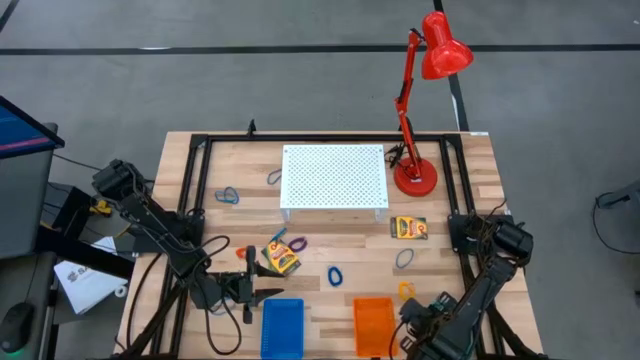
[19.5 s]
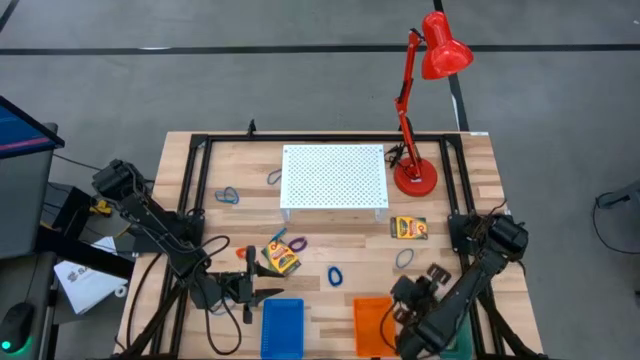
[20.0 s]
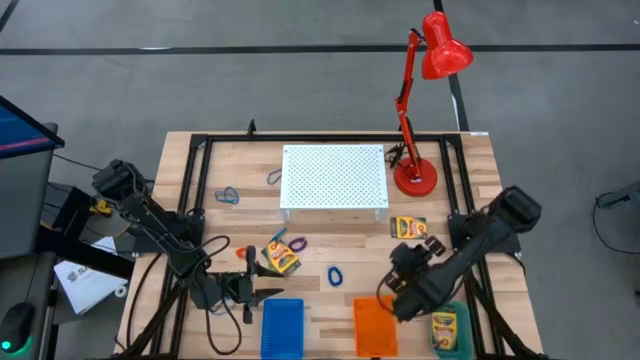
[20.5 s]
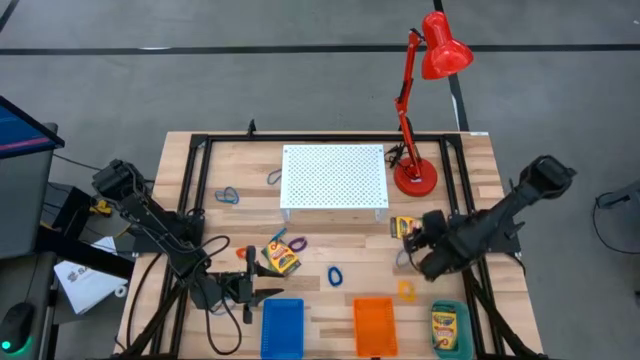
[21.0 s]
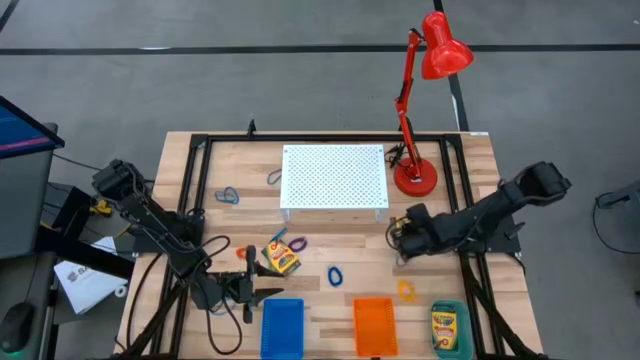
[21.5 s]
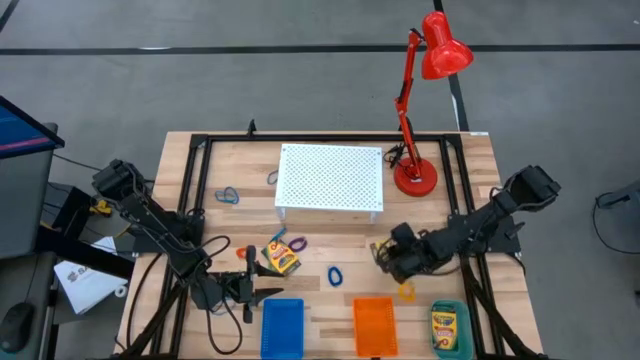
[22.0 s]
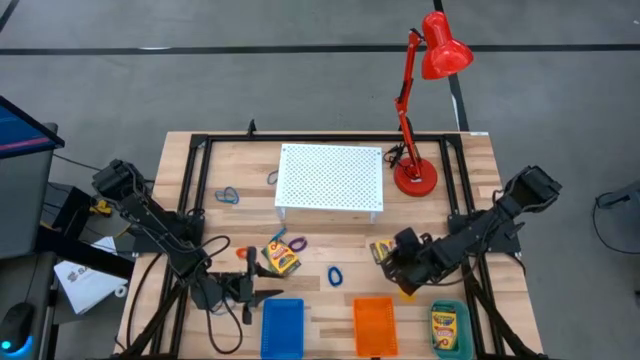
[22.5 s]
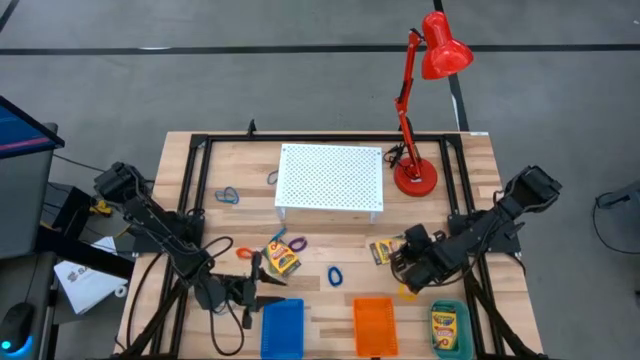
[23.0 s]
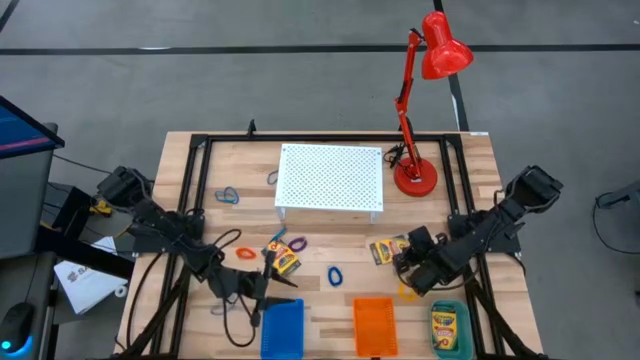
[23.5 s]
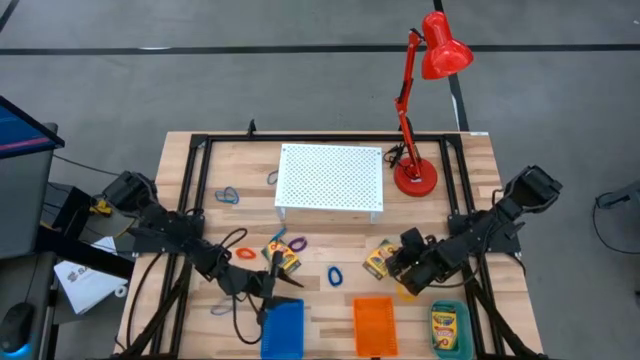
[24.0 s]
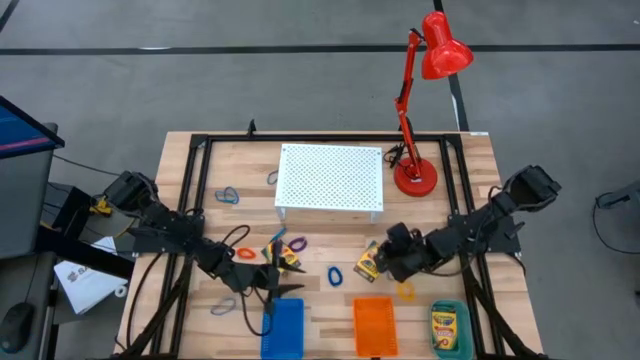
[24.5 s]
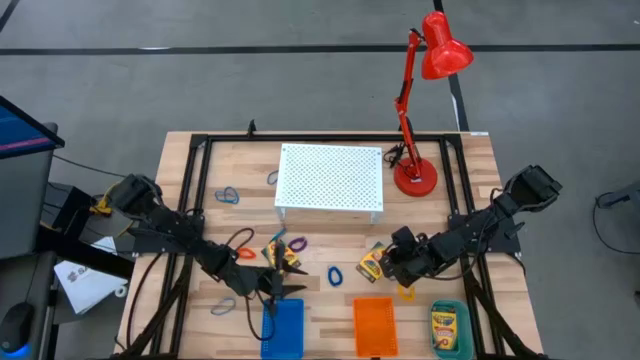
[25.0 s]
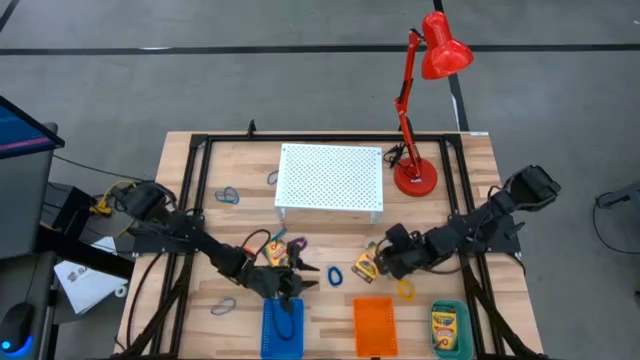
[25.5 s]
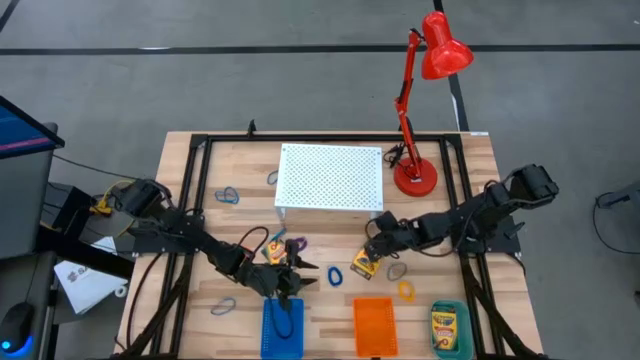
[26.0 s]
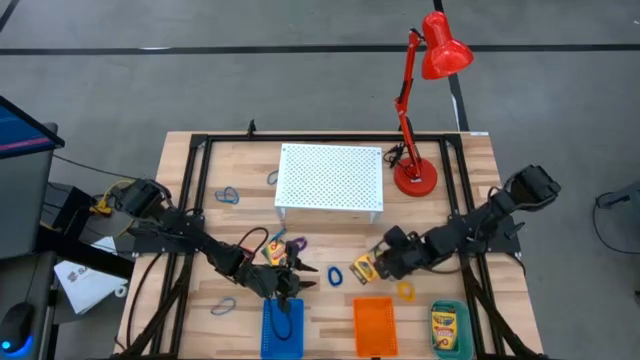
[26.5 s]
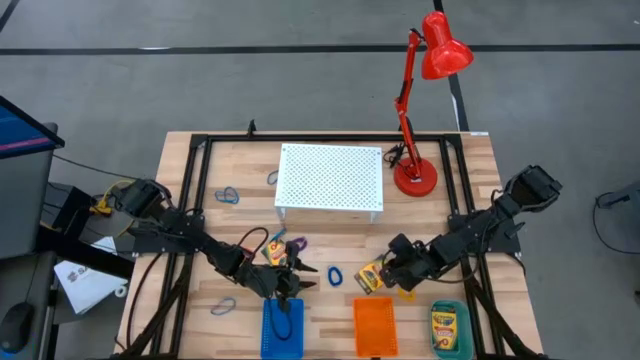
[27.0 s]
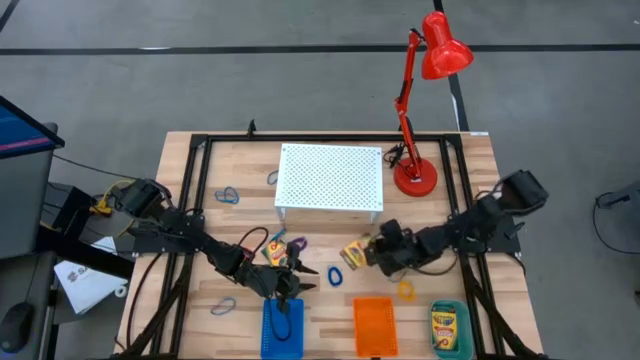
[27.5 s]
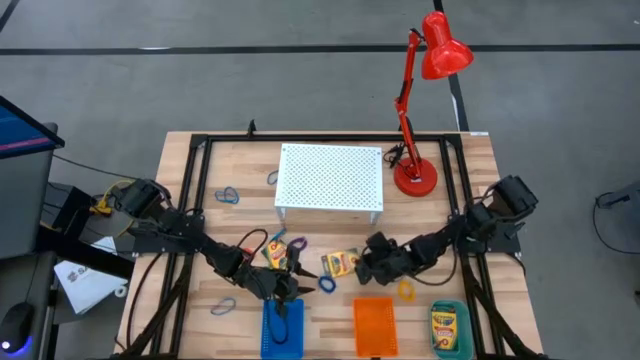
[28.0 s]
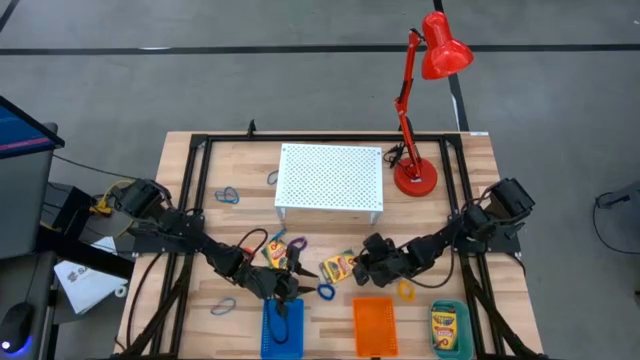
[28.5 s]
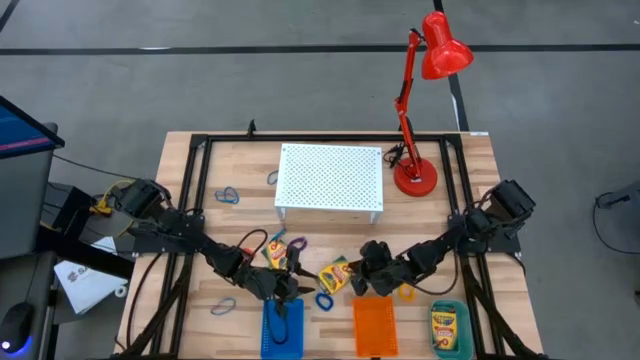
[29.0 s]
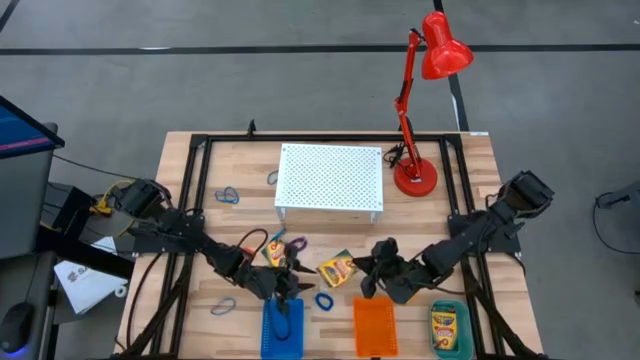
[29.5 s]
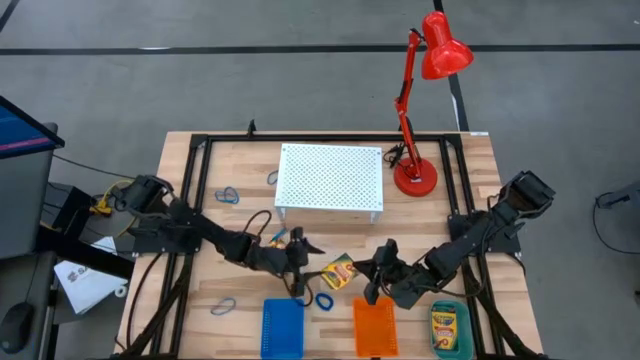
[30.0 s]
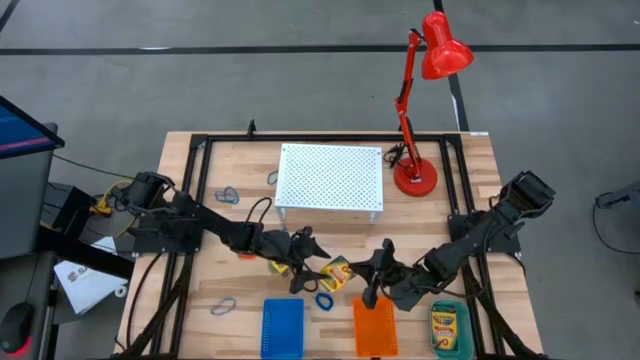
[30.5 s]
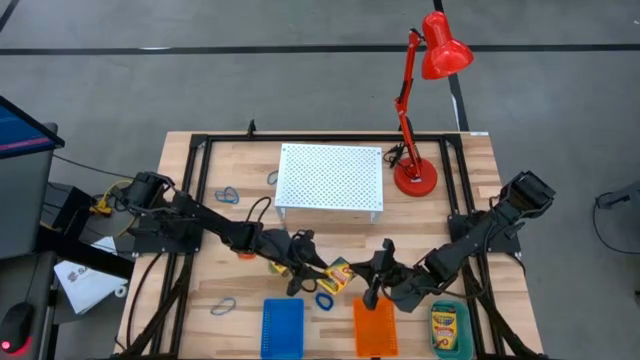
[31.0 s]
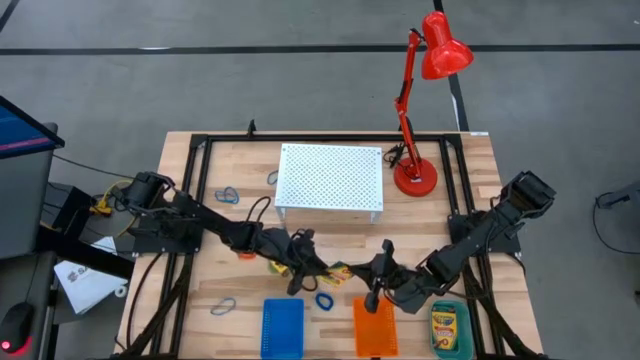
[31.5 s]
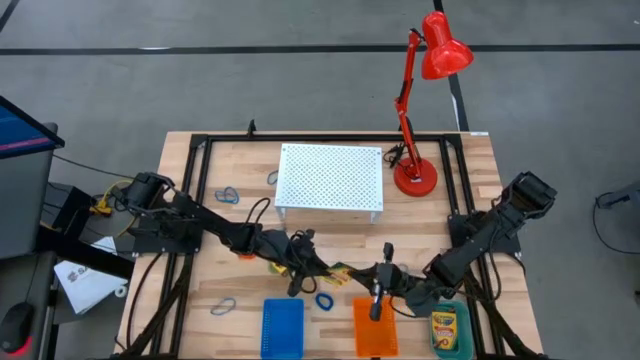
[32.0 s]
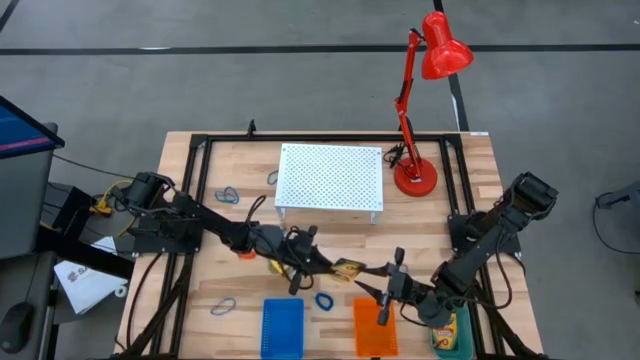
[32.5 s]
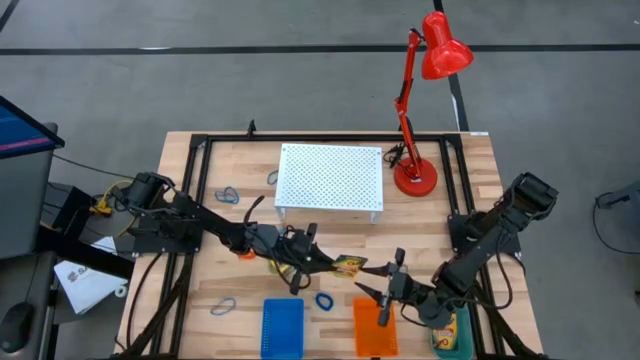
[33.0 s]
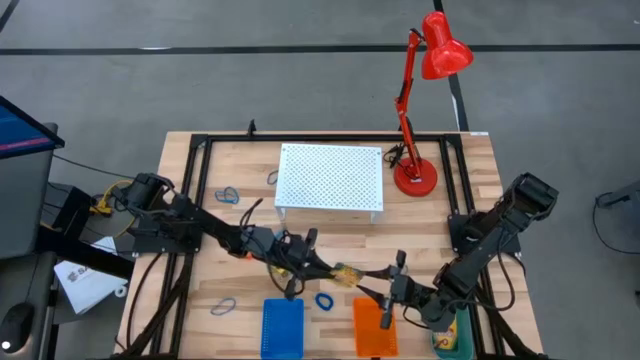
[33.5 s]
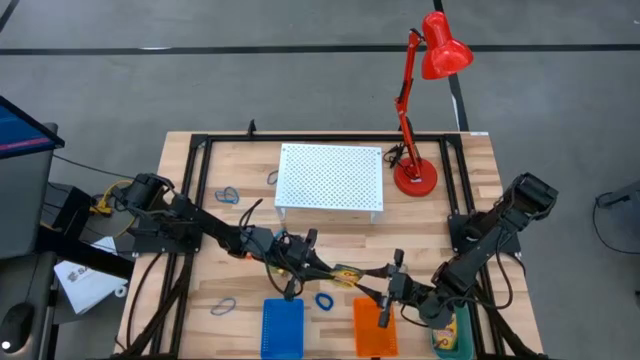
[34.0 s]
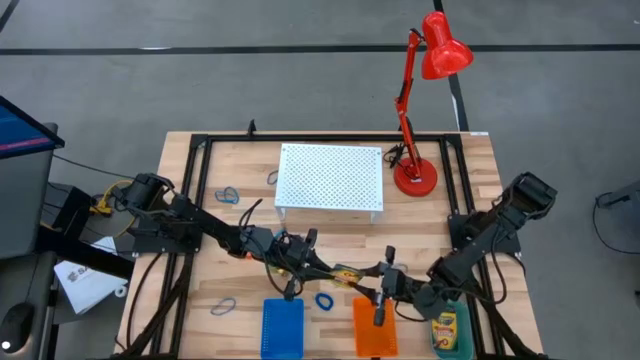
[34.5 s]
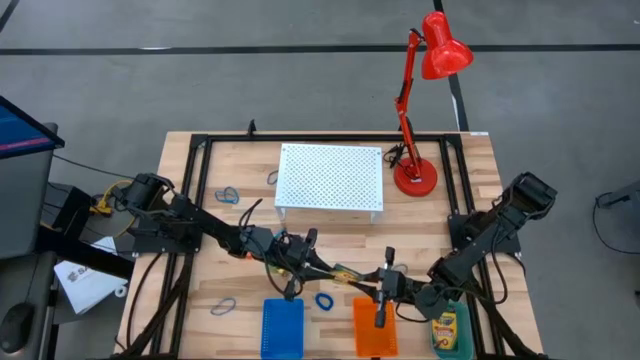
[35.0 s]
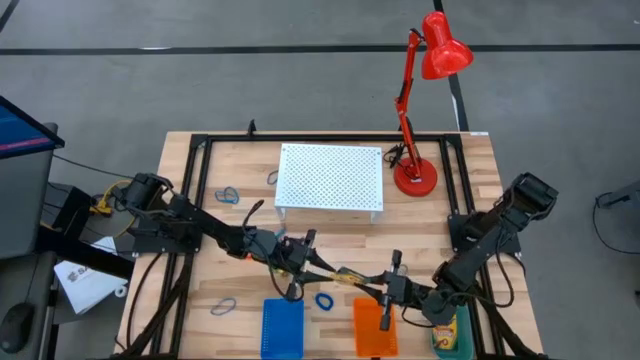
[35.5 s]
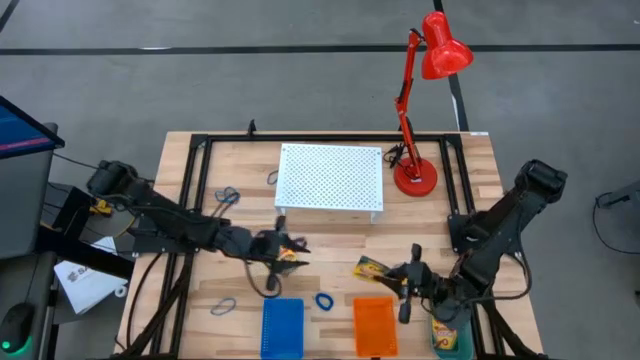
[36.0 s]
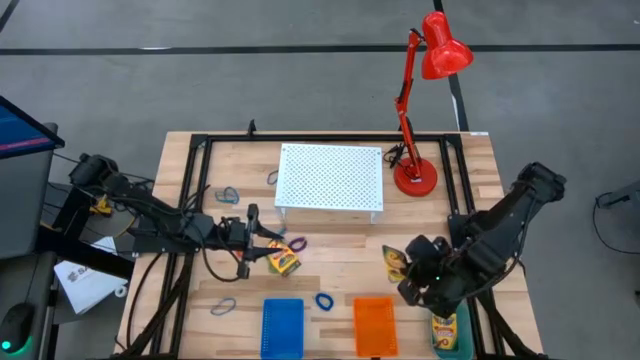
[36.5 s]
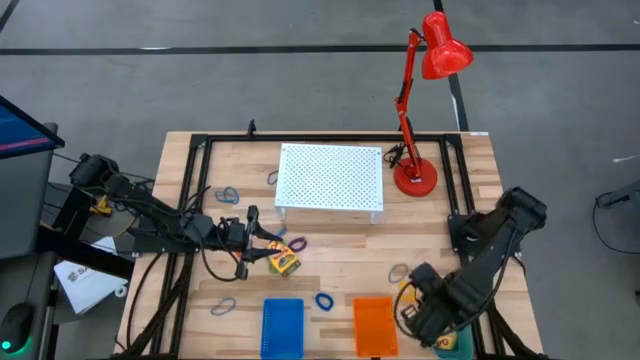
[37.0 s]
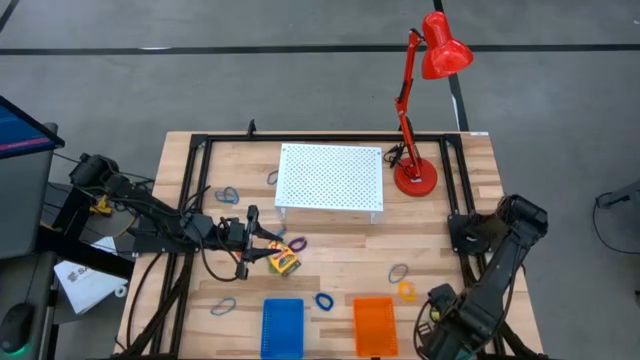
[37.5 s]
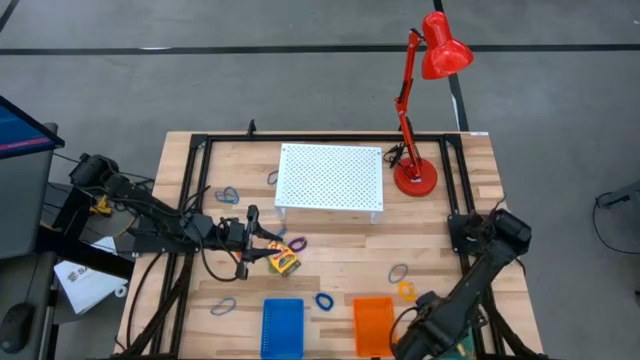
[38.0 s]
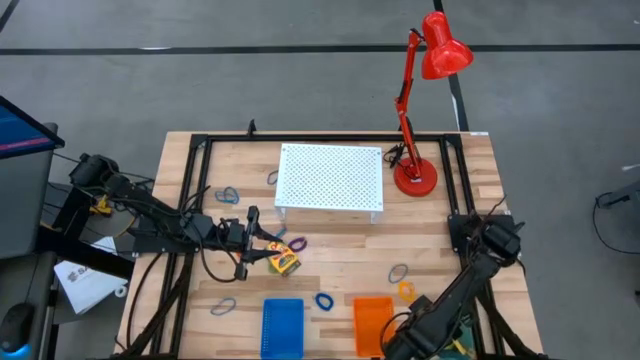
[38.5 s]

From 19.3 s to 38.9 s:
Task: Pick & Place Office Desk Supplies
Put the yellow crayon box into the green bin
